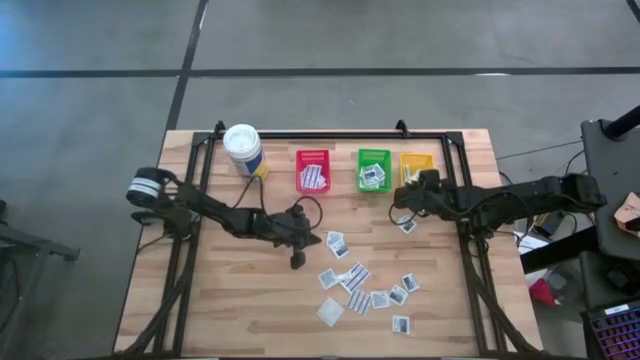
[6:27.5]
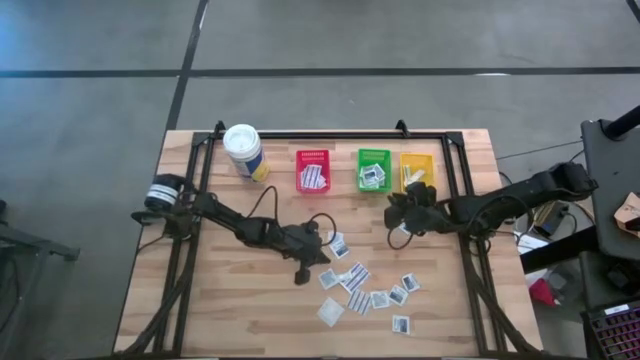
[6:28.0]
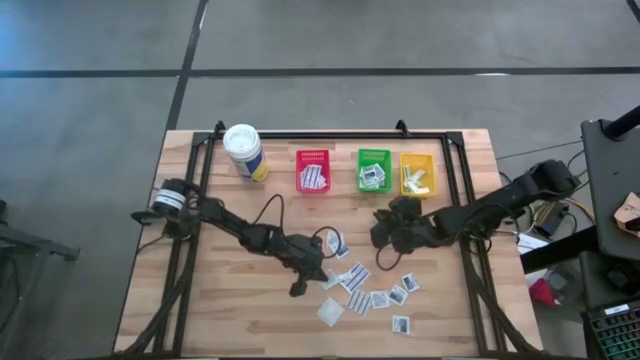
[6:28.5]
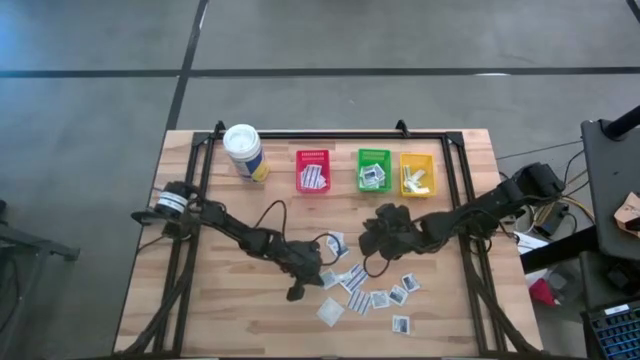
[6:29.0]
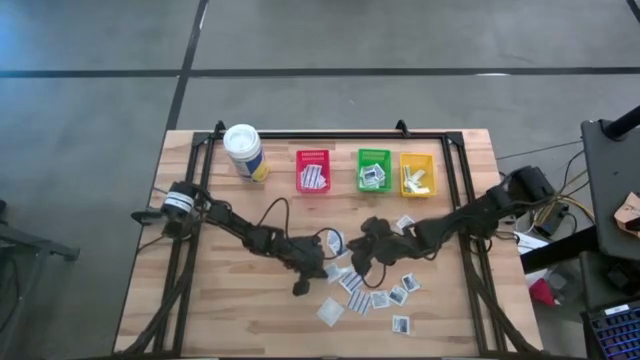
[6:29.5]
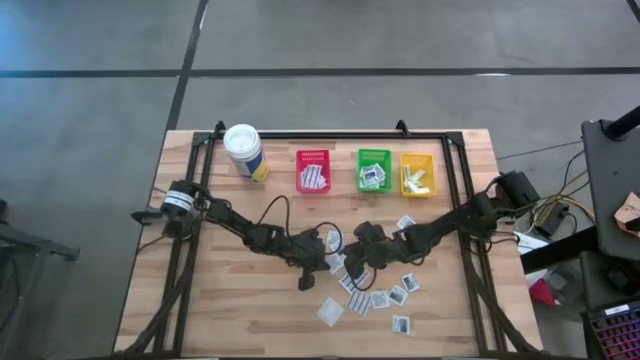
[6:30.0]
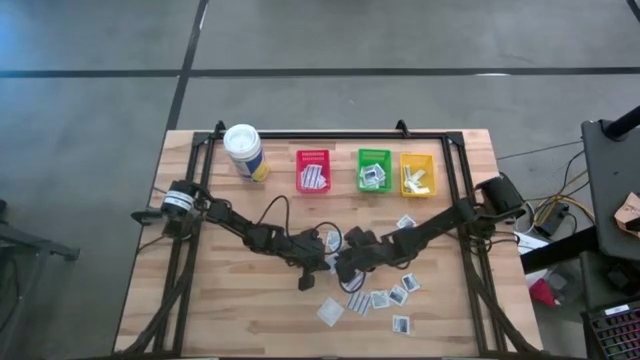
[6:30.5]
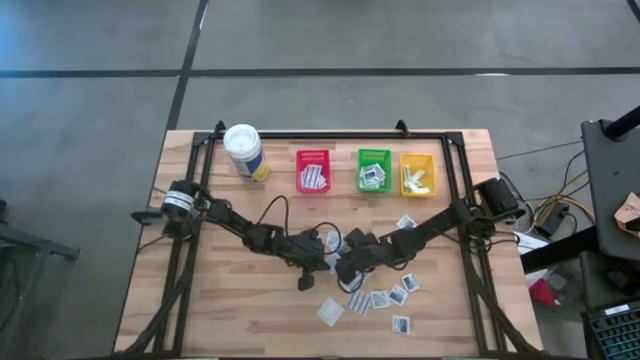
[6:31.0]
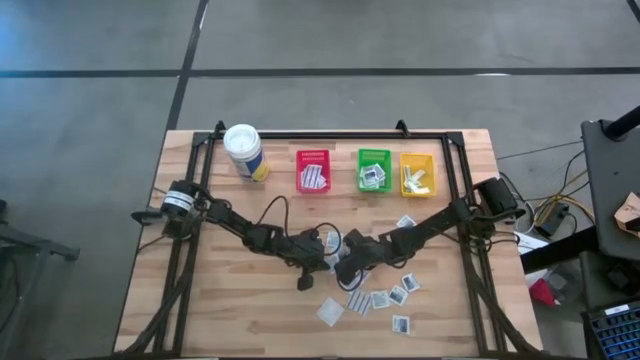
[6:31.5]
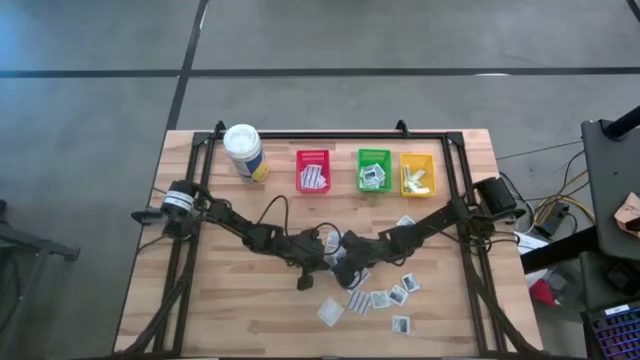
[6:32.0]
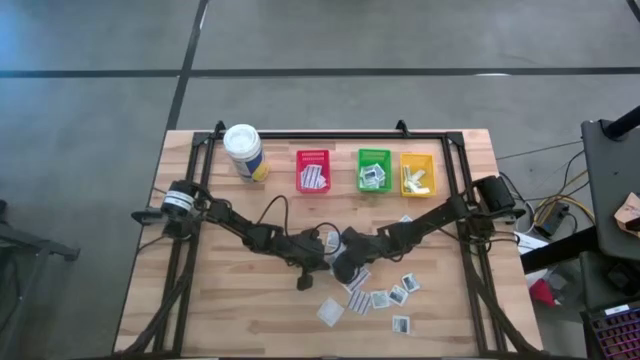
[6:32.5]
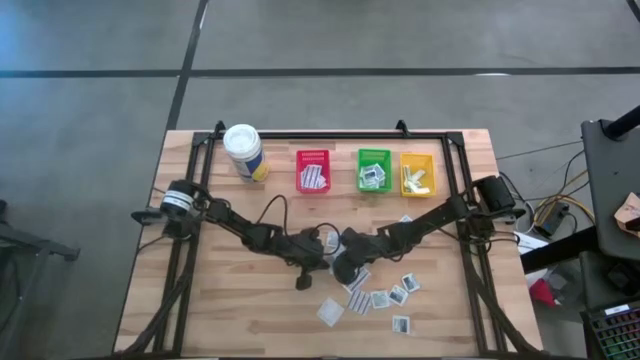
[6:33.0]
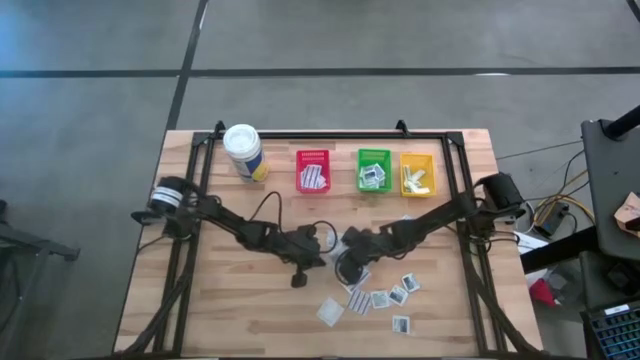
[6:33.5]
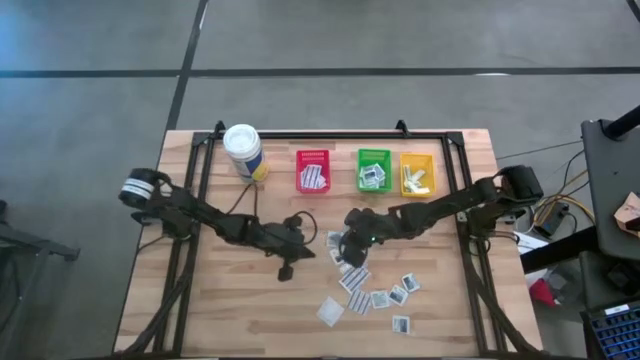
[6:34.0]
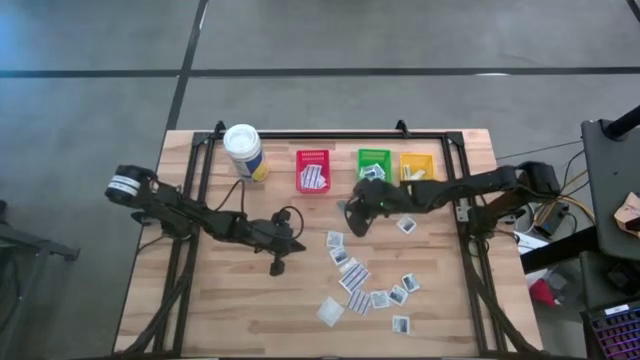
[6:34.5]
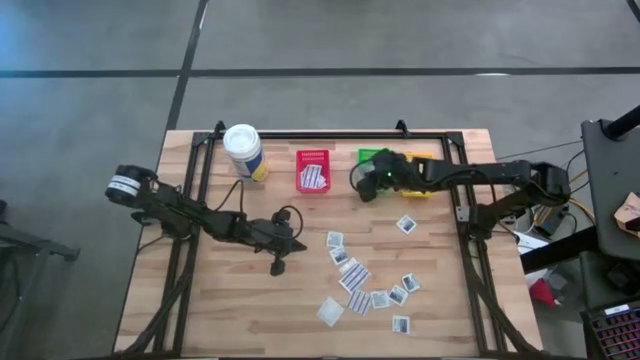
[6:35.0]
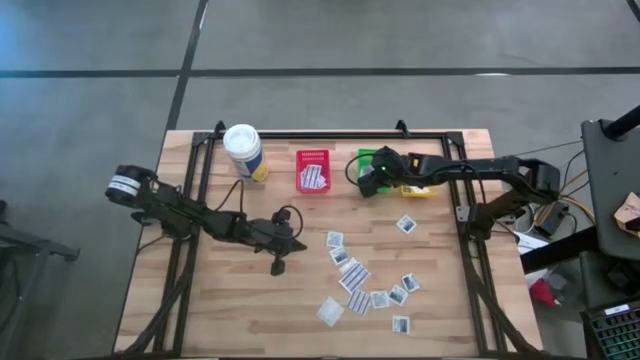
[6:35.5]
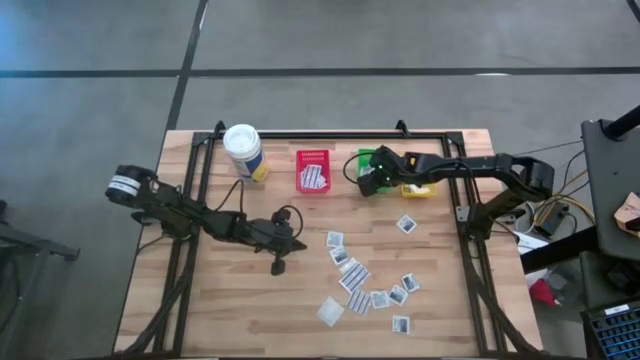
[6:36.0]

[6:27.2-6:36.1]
Task: Pick & Place First Aid Supplies
Put the alcohol pad in the green bin

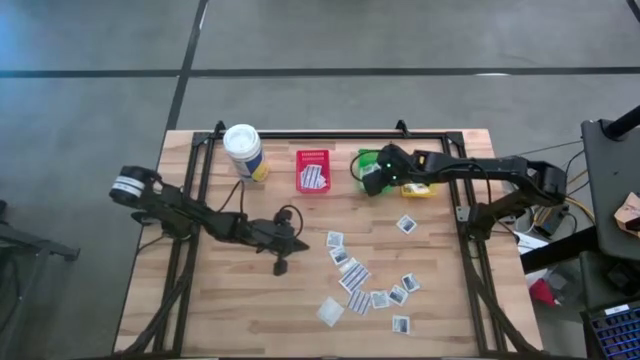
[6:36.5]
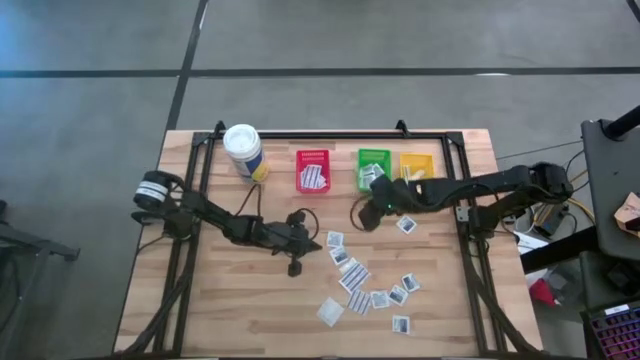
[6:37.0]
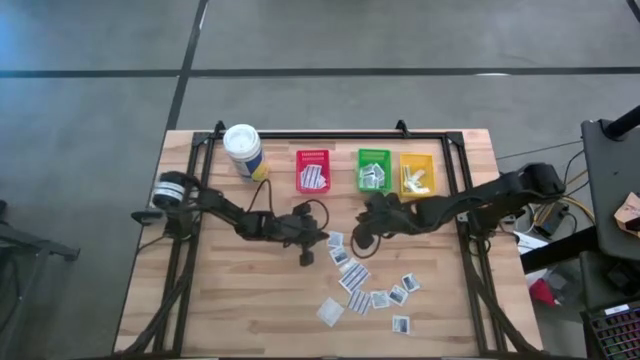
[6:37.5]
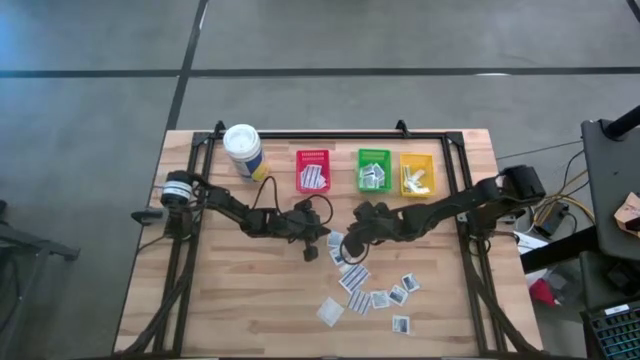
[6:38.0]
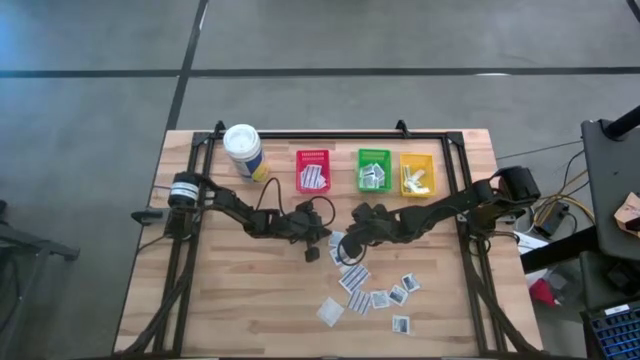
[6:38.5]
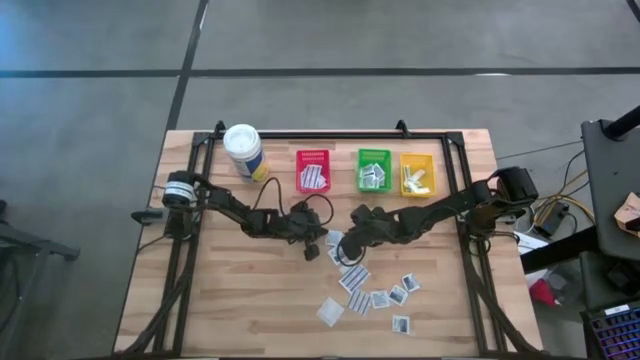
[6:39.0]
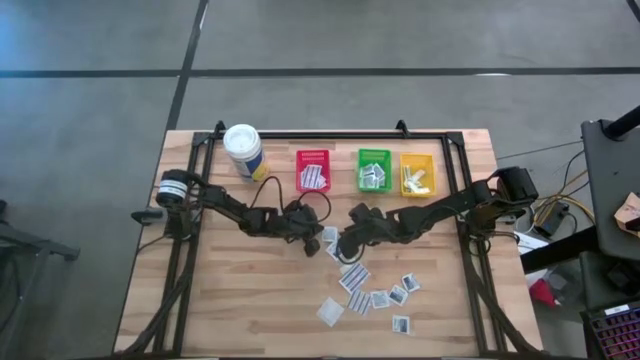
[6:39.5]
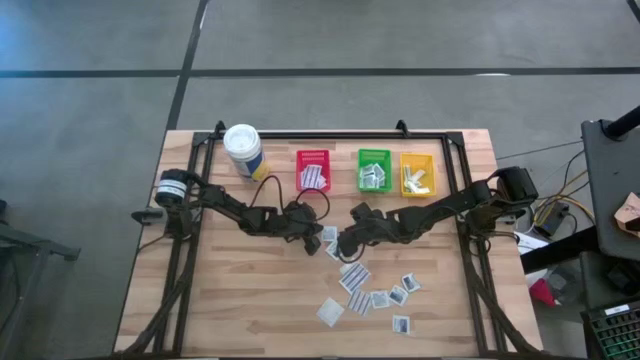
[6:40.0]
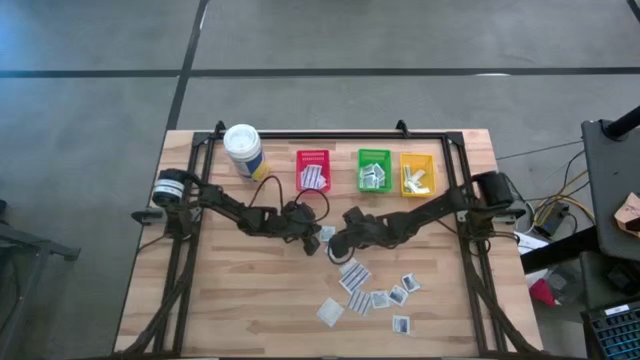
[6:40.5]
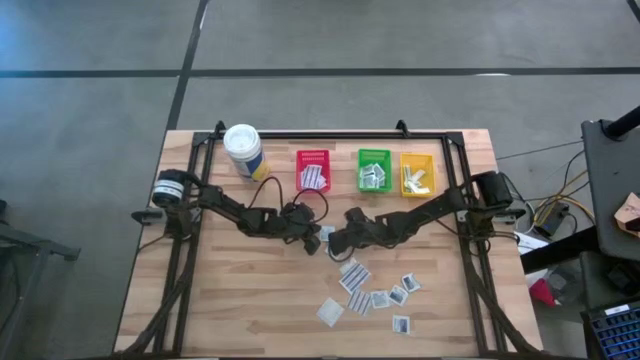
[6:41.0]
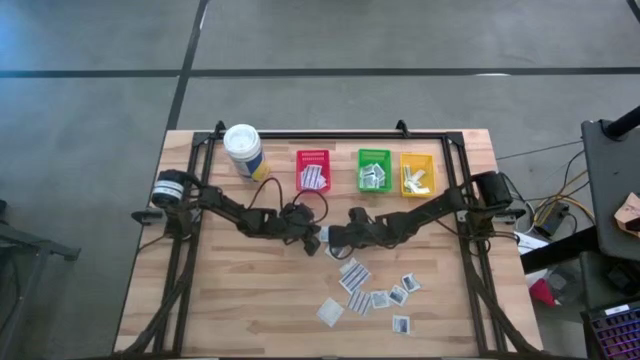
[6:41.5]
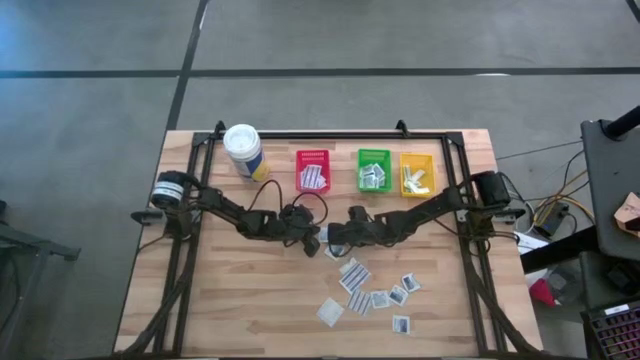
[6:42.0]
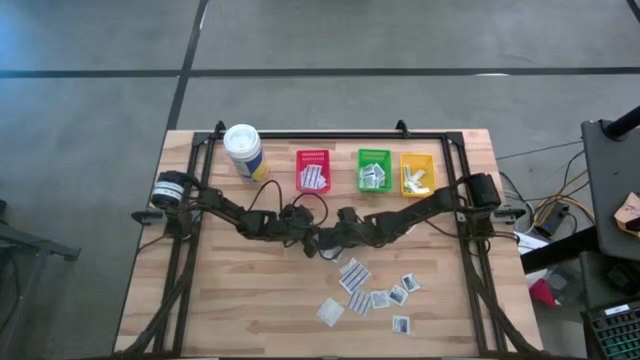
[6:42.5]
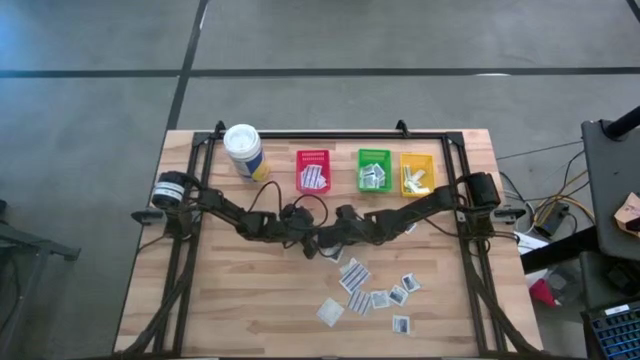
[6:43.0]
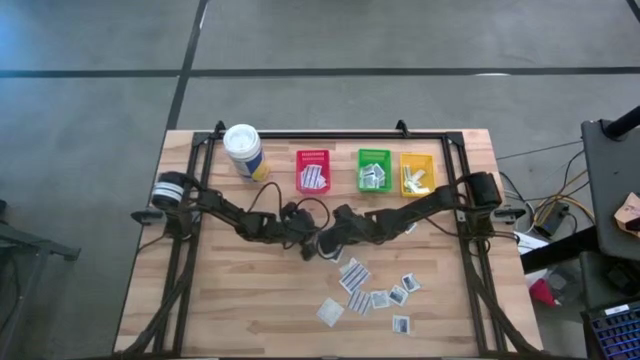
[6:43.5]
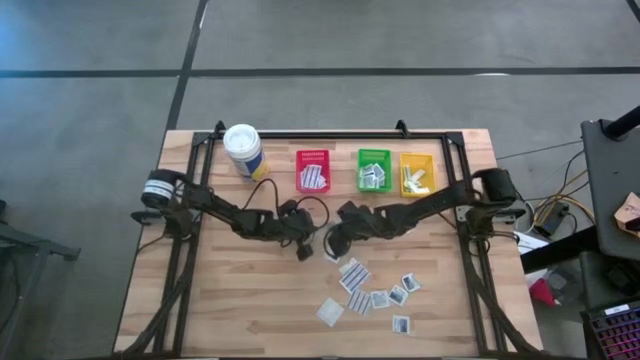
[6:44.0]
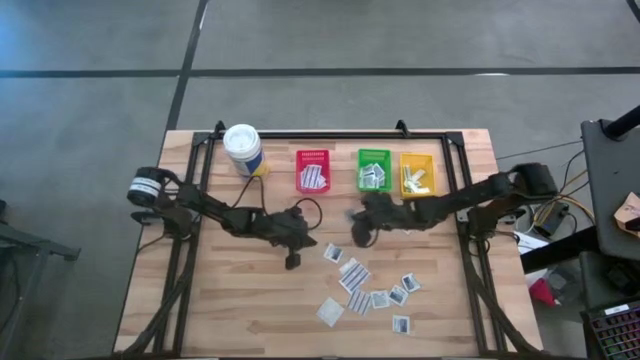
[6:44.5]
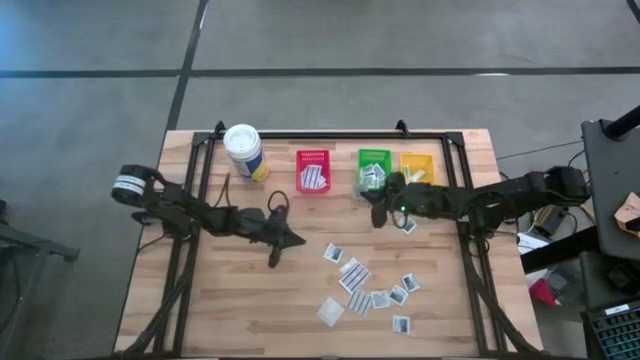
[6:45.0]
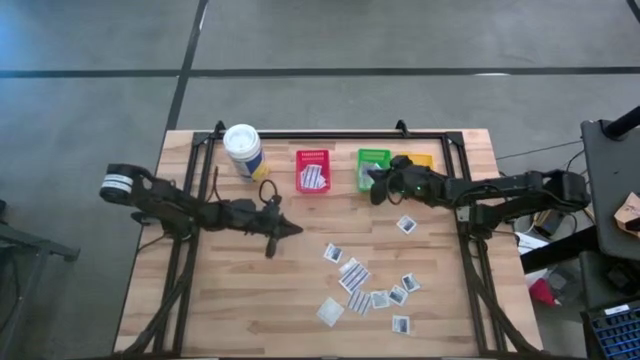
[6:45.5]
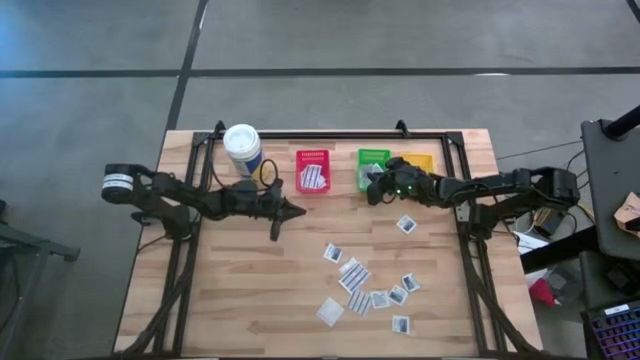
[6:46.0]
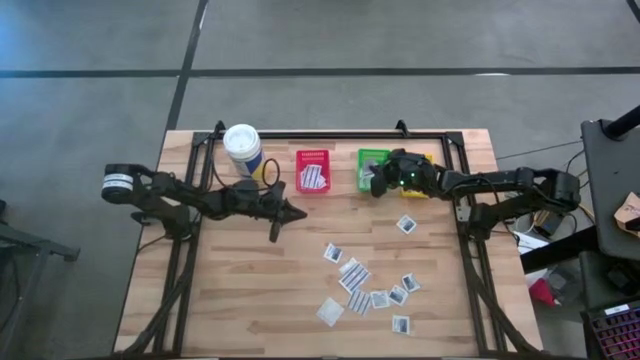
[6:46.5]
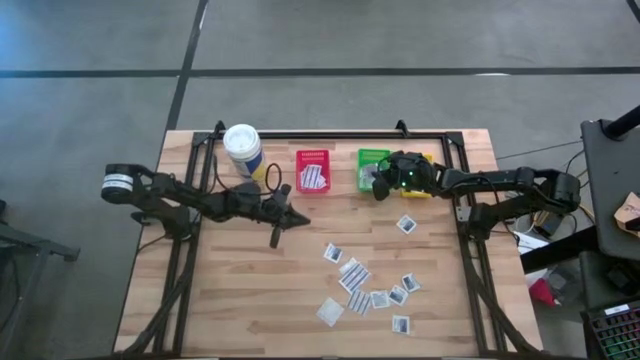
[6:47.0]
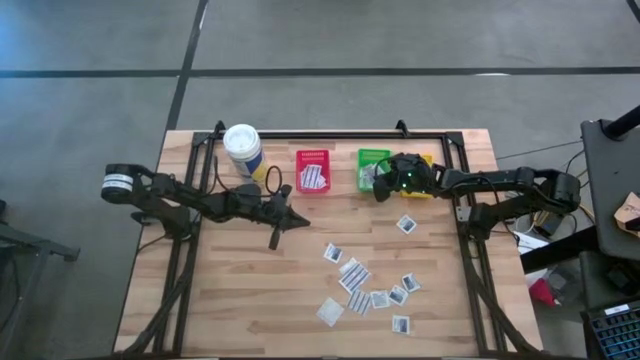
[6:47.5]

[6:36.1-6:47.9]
Put the alcohol pad in the green bin
